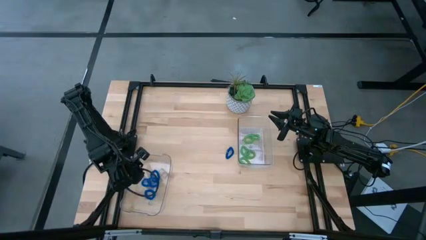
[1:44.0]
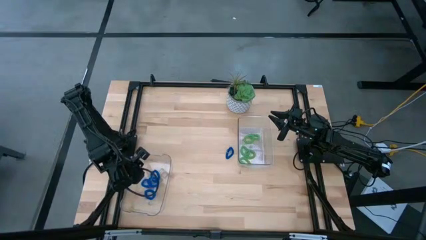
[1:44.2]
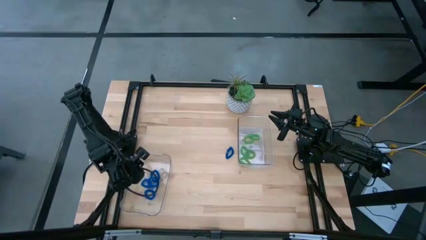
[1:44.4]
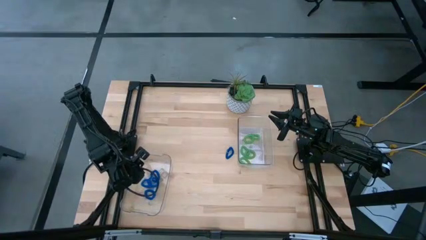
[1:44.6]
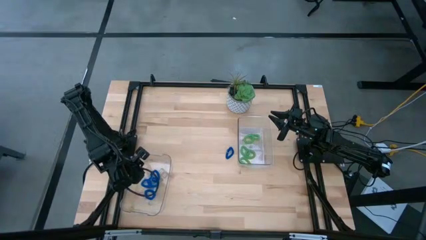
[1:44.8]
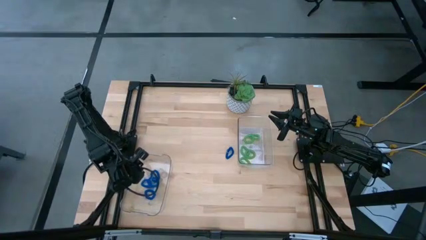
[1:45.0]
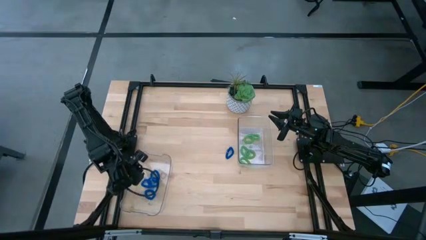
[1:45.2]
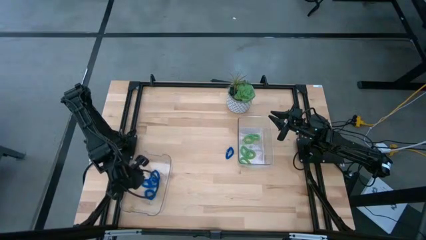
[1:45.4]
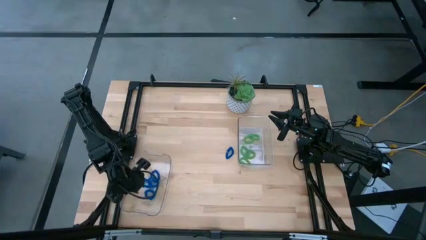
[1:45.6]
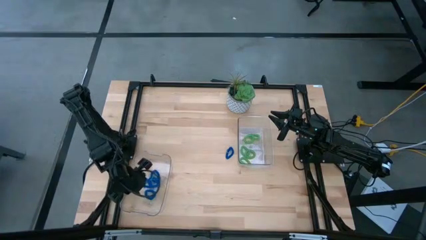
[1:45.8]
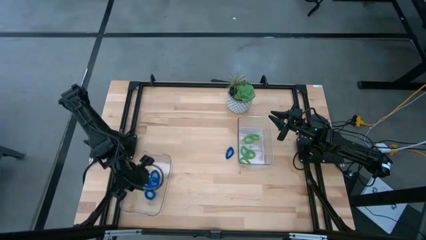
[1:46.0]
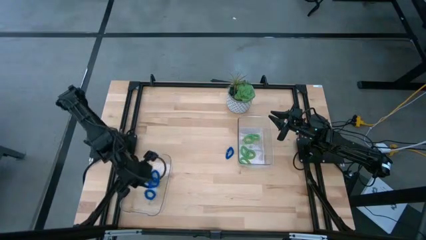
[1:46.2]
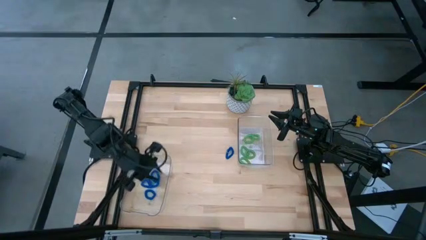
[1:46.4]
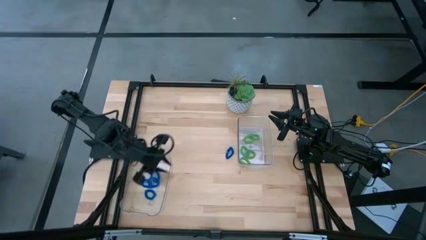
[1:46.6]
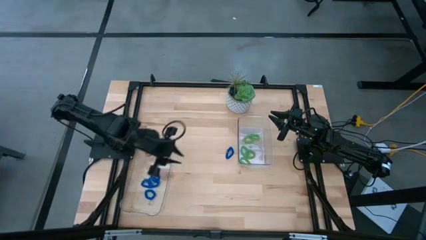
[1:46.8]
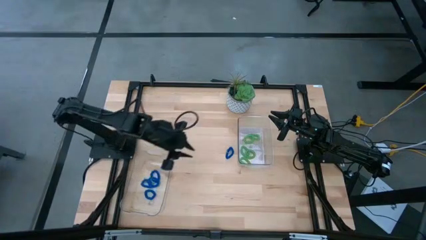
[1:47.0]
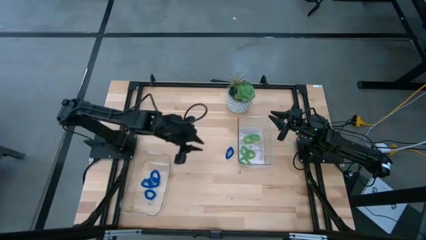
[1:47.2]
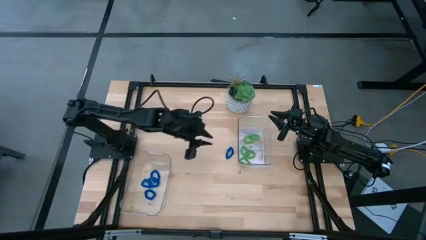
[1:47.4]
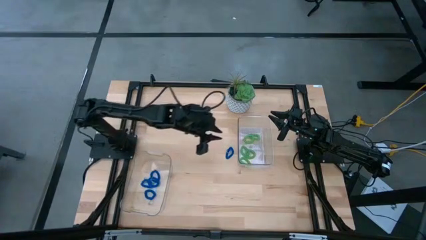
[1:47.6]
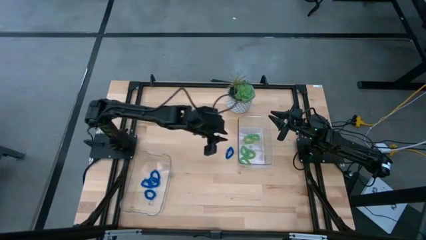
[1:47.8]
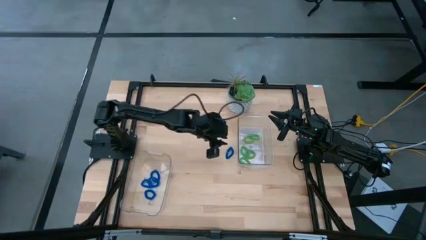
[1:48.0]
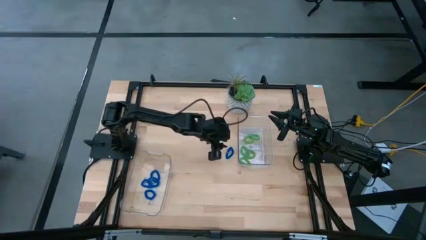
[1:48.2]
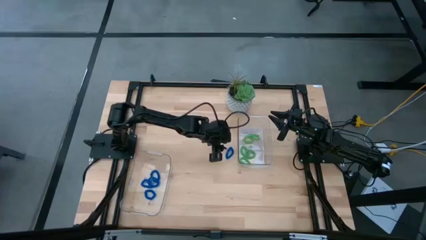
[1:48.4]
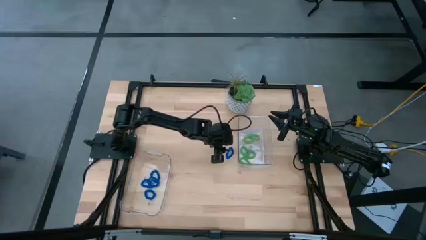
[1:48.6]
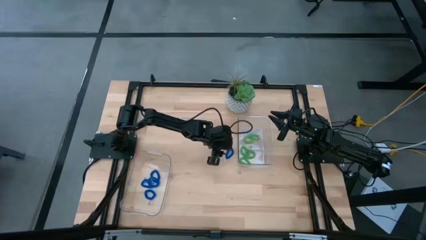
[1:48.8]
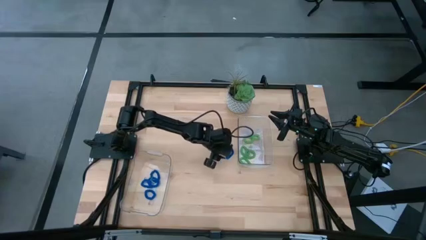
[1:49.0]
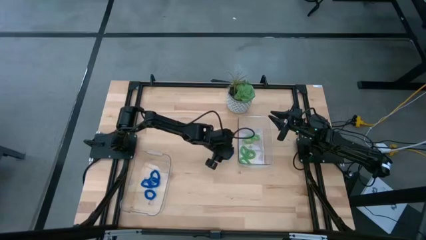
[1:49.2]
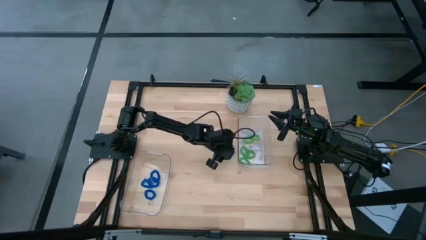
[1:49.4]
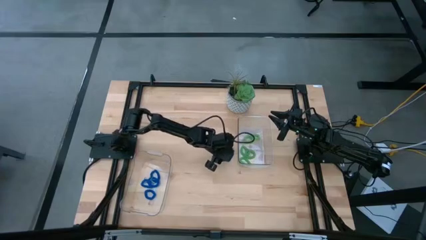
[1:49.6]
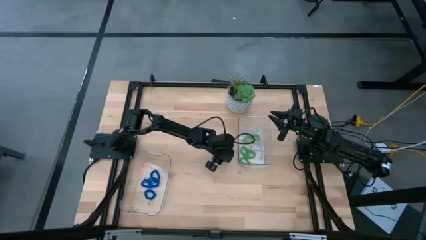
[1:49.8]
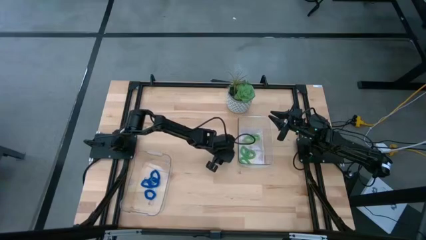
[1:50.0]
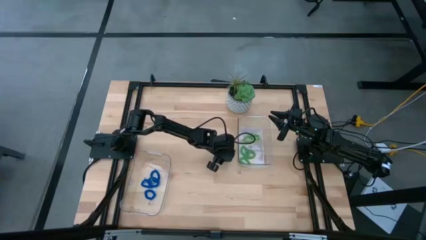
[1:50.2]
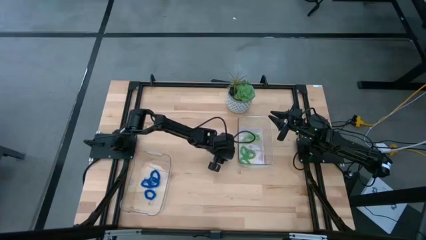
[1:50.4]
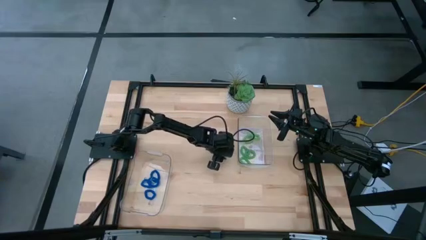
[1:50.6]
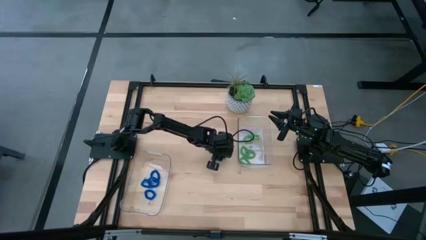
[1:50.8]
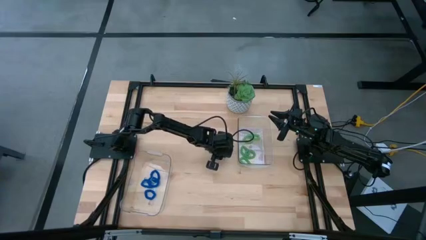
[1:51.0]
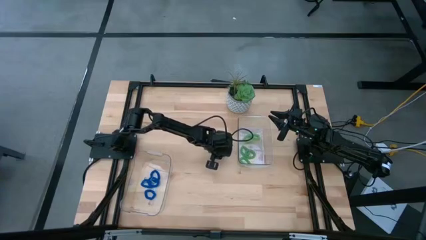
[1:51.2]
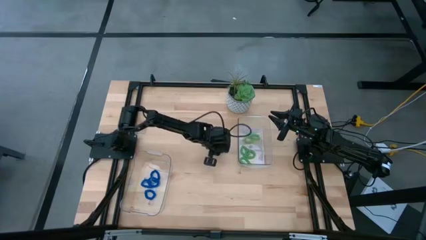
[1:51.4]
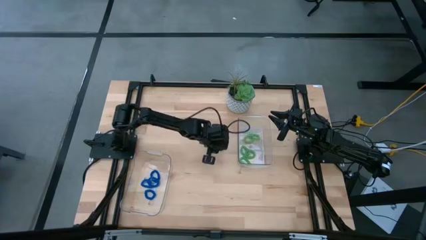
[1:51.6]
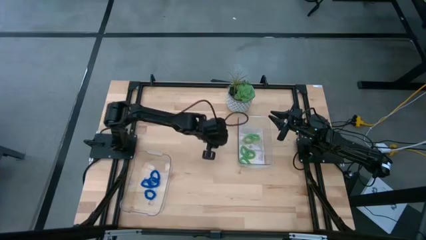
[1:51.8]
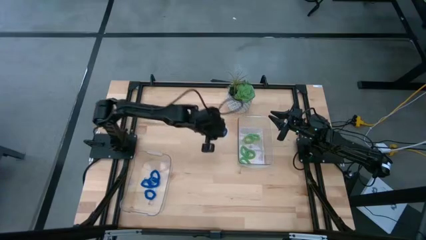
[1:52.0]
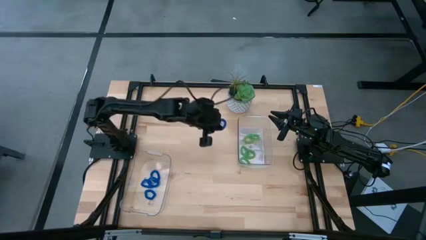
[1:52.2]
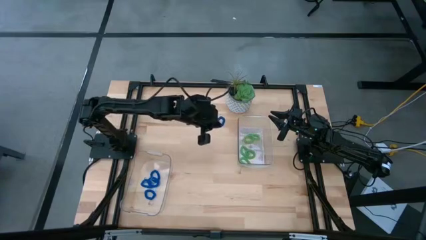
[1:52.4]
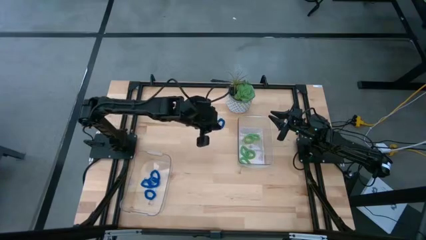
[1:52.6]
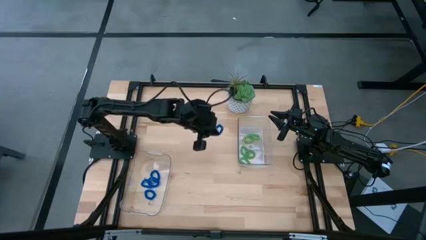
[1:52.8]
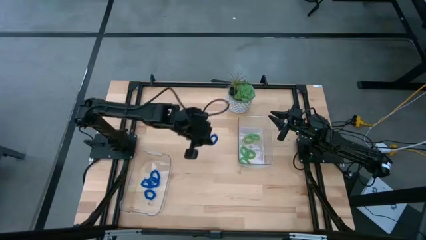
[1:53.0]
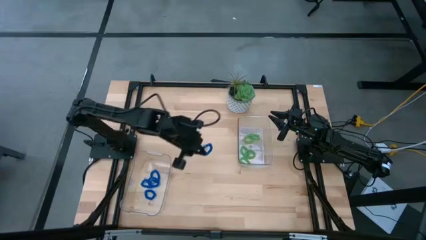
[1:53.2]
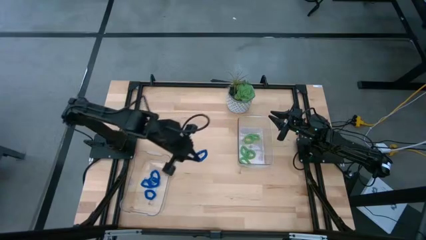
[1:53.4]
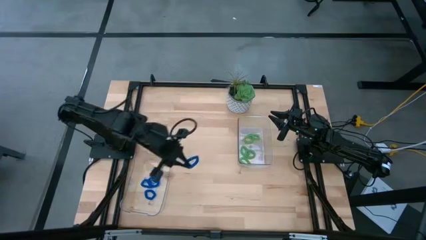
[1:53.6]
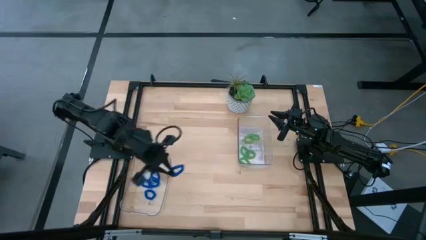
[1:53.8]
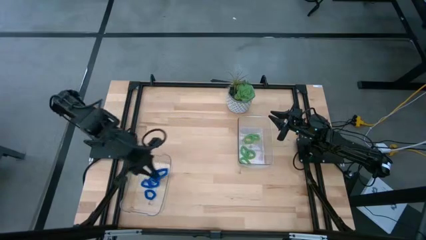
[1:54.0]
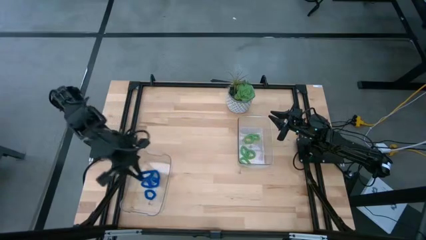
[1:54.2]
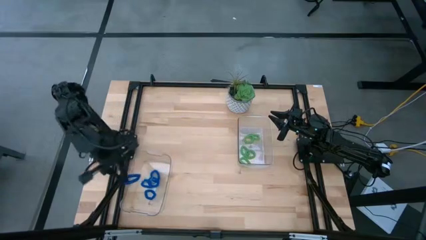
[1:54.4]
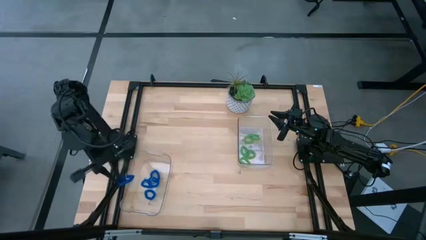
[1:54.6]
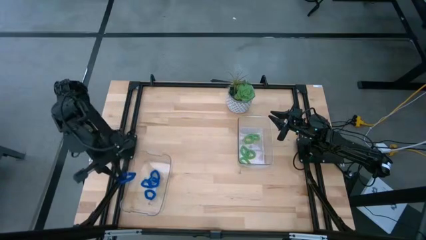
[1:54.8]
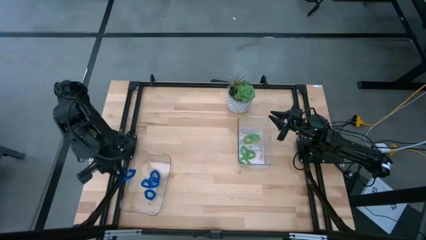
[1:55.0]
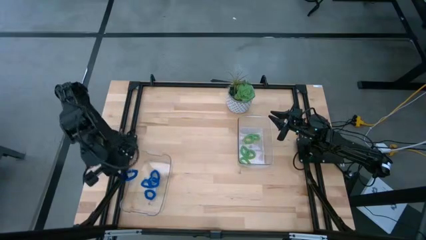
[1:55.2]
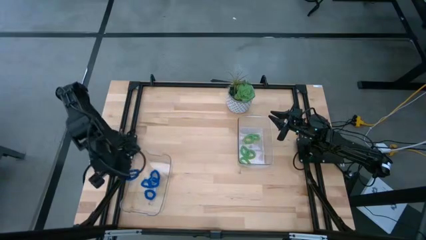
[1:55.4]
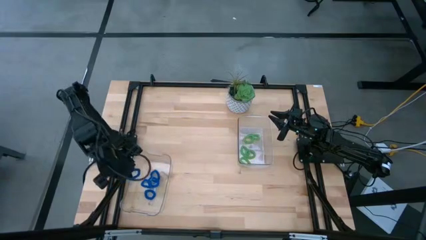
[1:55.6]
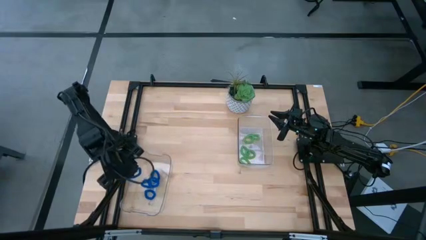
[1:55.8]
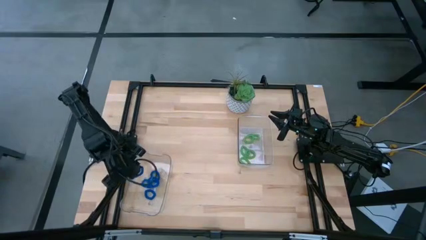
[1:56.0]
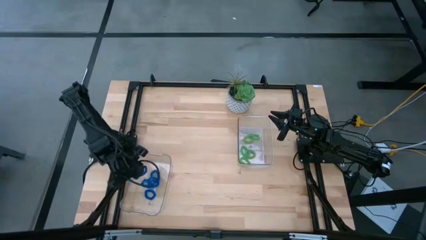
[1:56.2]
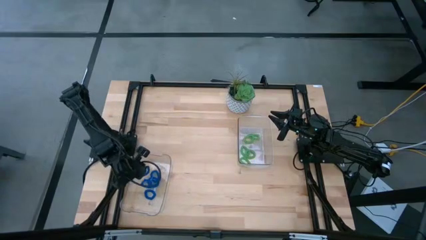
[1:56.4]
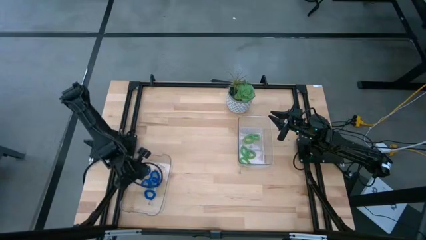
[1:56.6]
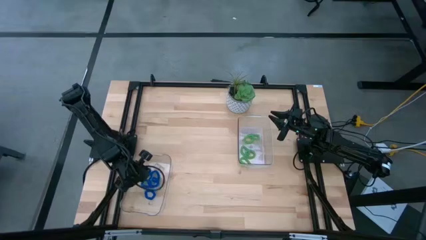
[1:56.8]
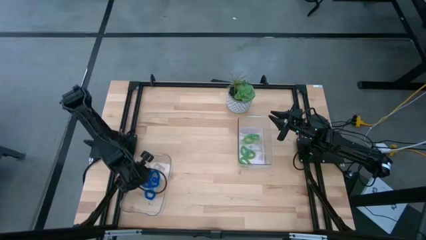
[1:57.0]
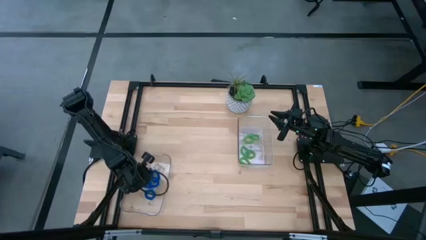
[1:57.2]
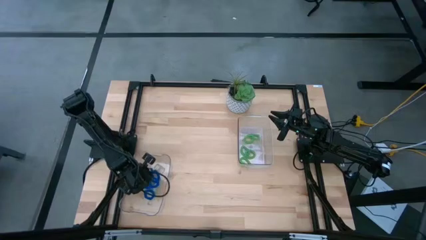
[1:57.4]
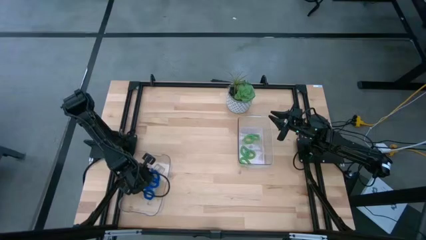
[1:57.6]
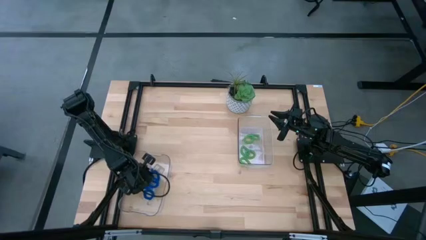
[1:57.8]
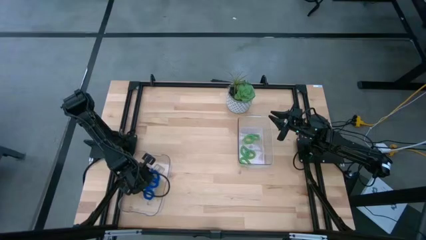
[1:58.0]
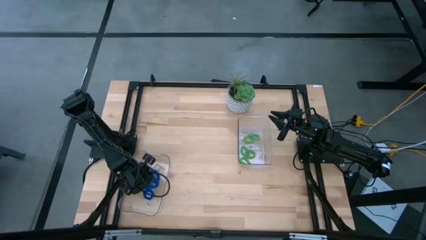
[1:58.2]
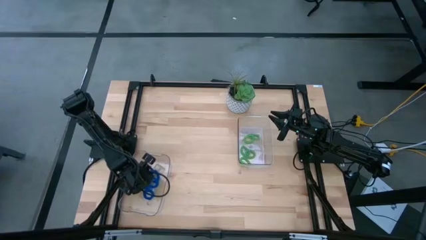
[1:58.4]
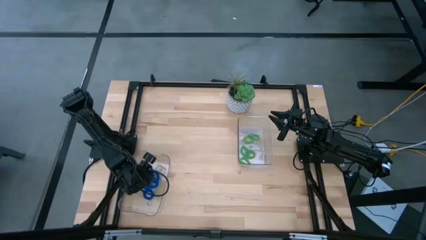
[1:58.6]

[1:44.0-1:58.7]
Task: Sort spring keychains
Put the blue spring keychain into the bottom transparent bin

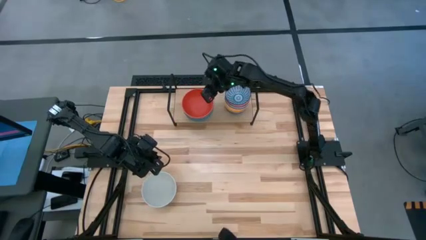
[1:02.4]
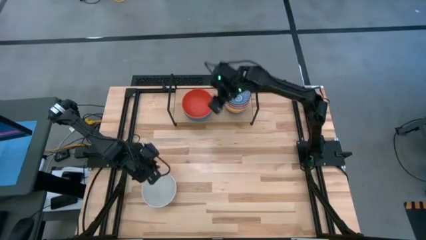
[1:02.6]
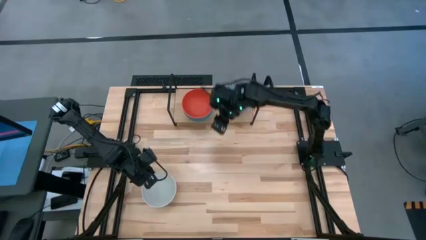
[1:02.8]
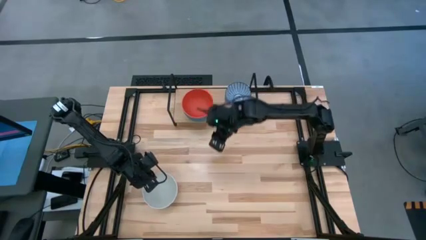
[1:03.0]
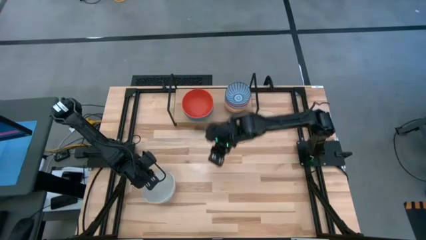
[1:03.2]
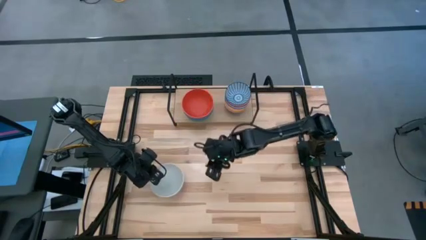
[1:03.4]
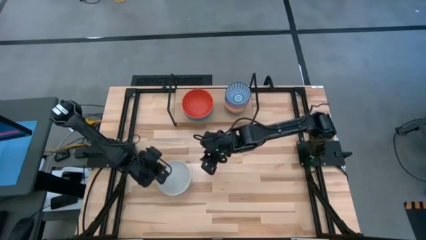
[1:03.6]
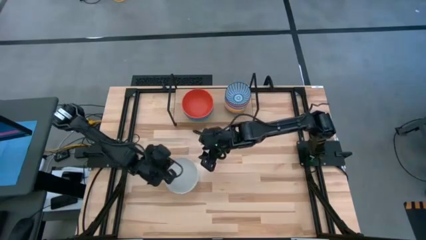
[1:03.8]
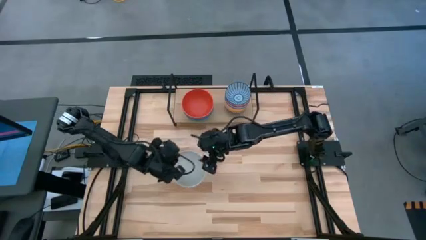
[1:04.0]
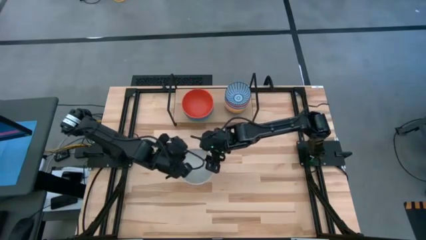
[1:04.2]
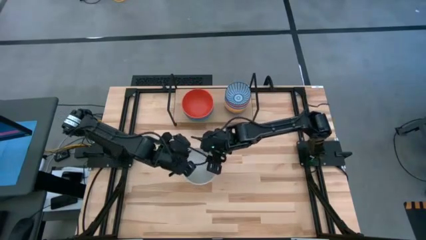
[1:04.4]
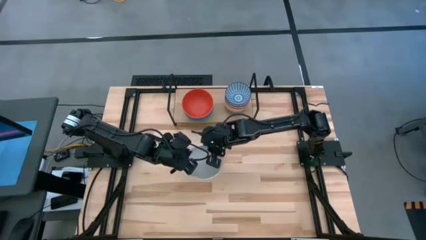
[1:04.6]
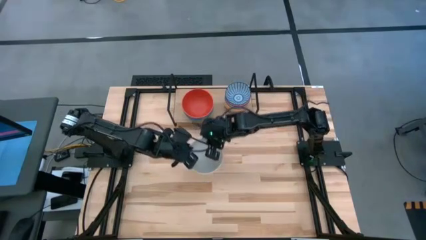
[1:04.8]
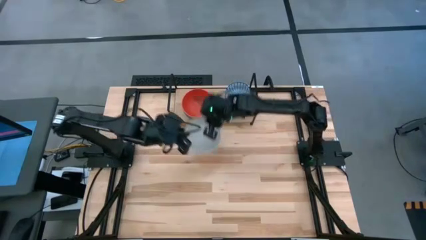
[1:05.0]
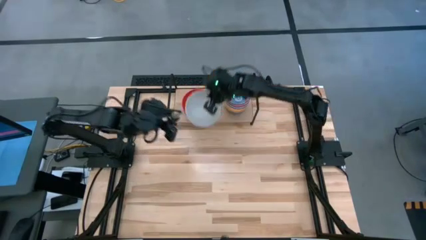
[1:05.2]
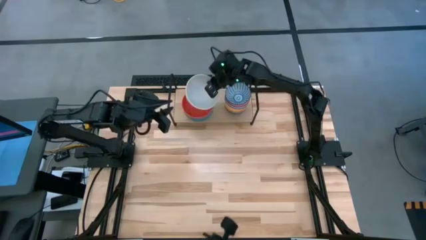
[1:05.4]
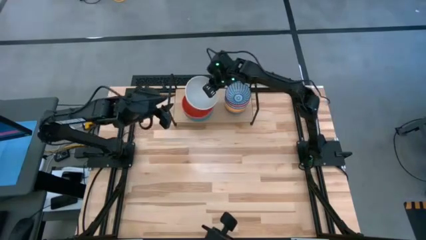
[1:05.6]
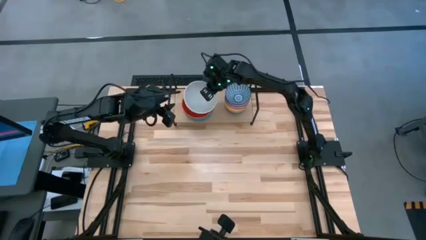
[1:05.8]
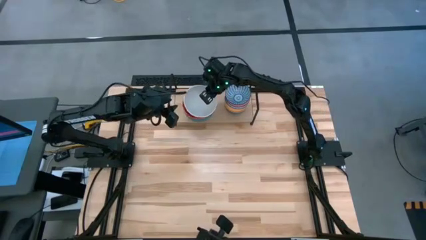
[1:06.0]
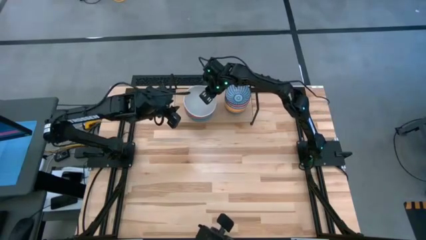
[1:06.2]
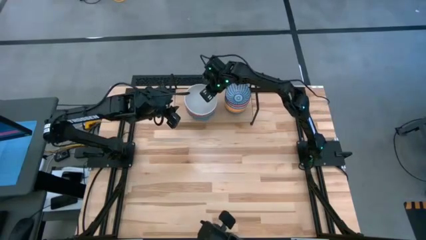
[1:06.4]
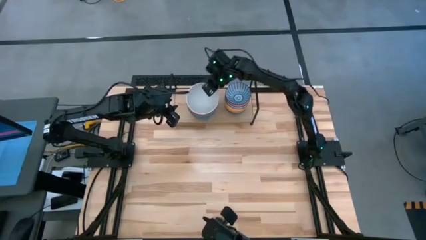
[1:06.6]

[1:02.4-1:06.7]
Task: Place and stack bowls onto a shelf
Stack the white bowl on top of the red bowl on the shelf
